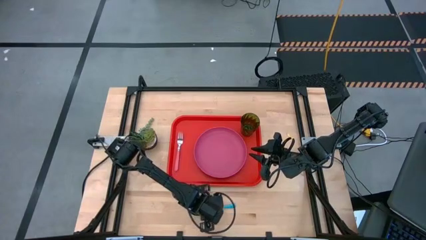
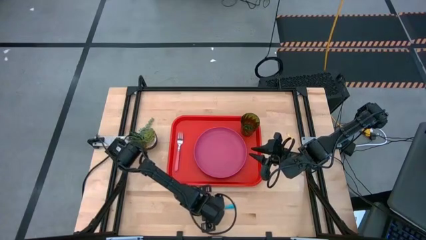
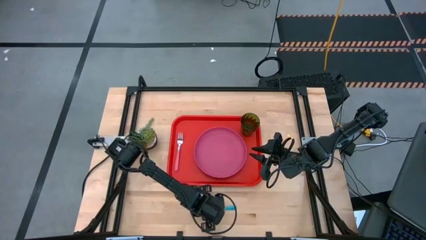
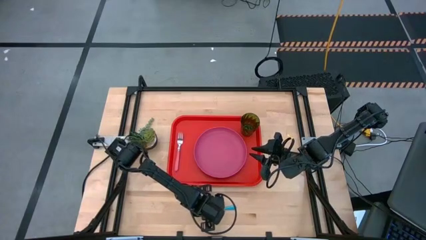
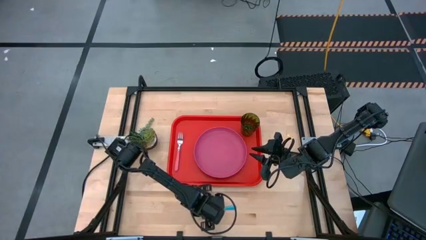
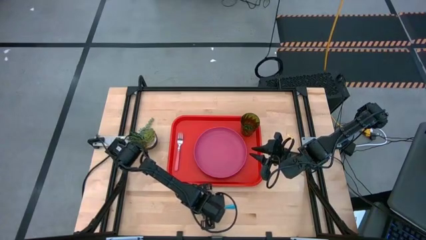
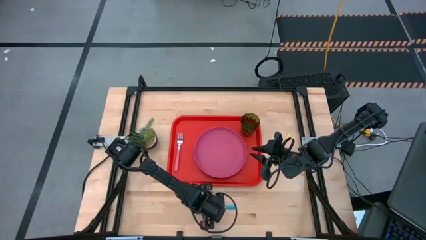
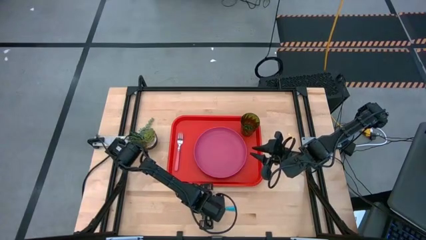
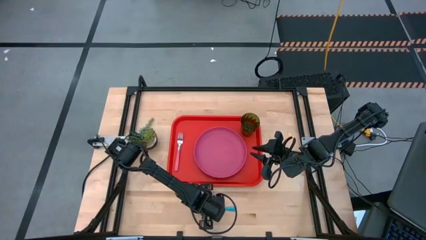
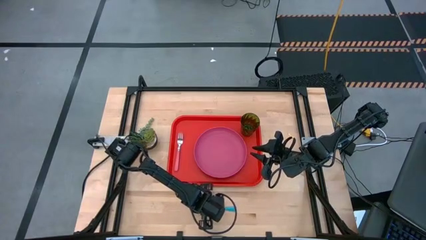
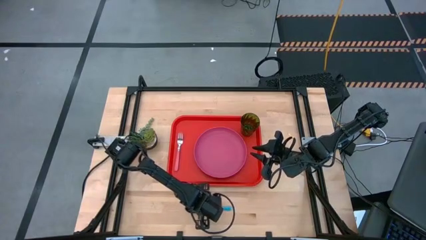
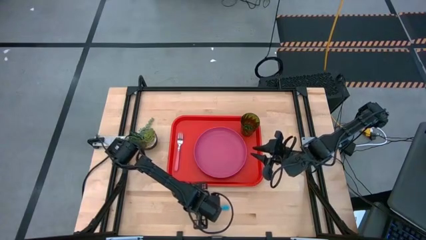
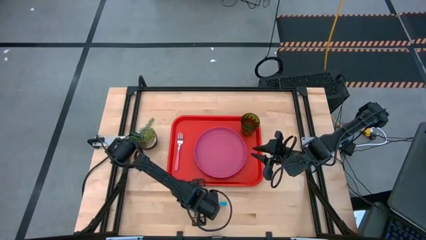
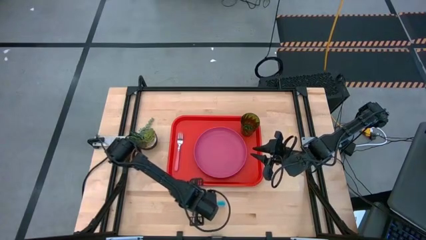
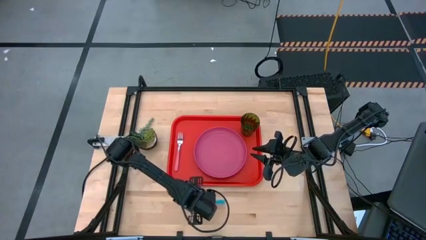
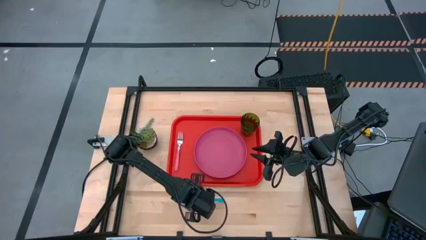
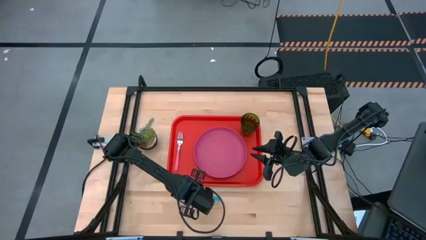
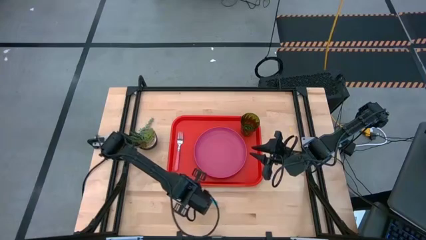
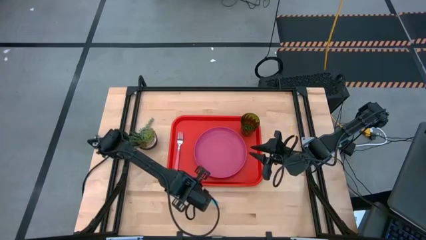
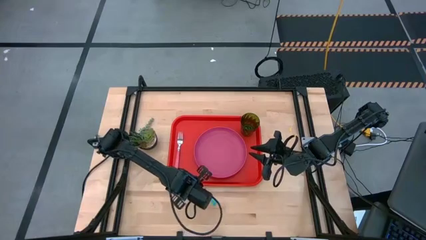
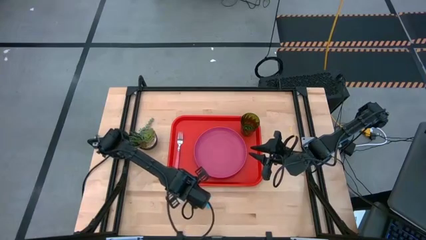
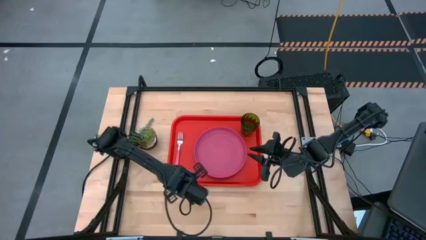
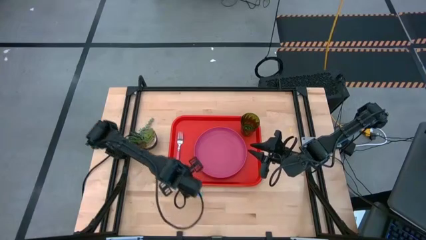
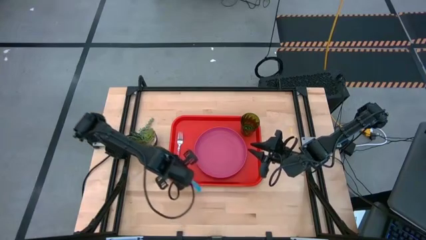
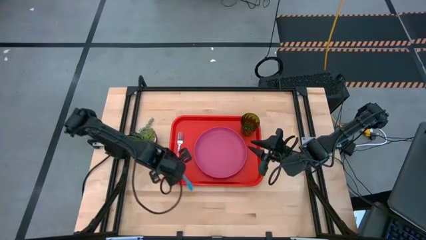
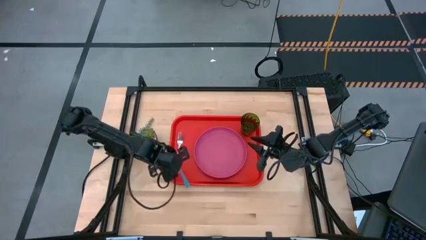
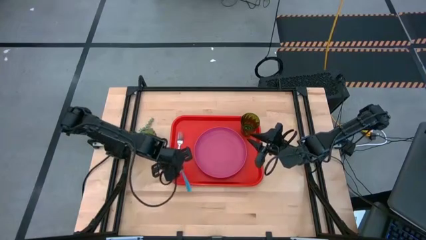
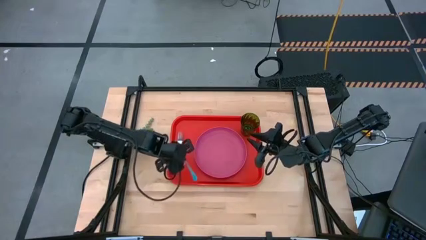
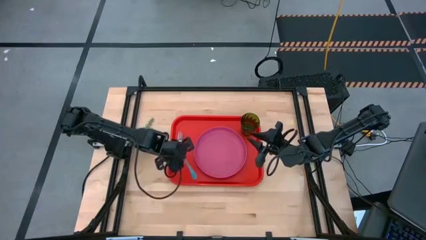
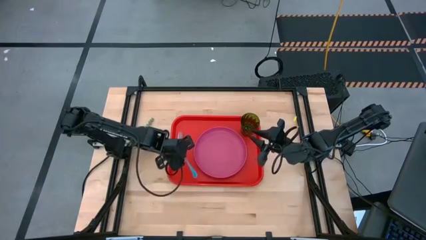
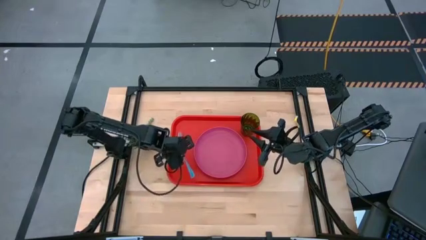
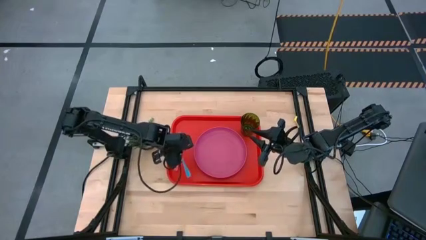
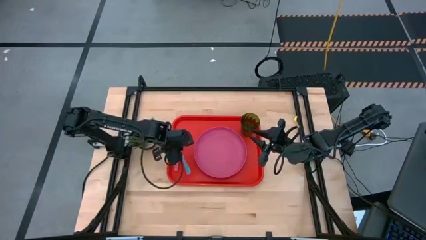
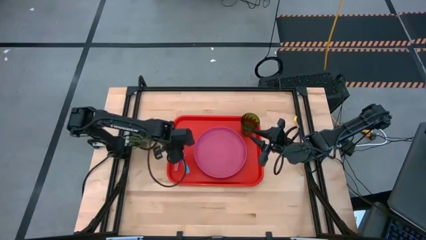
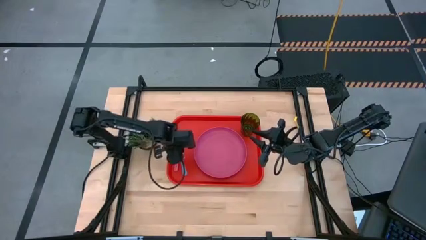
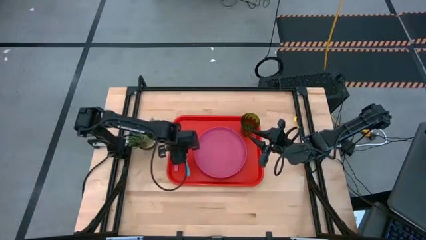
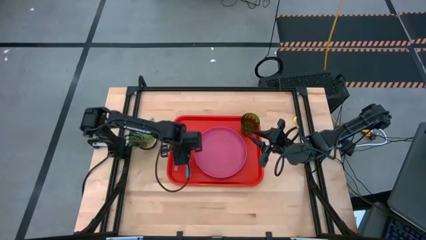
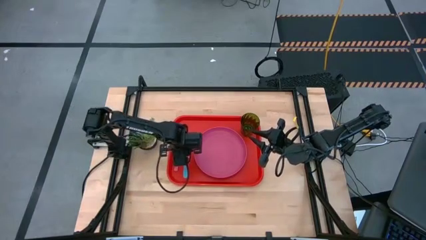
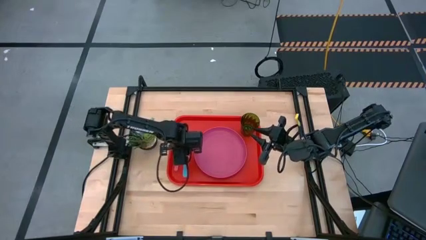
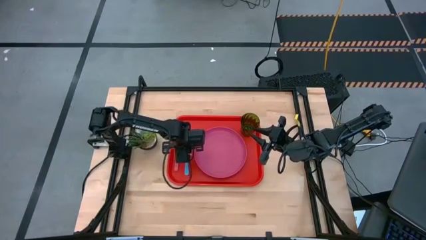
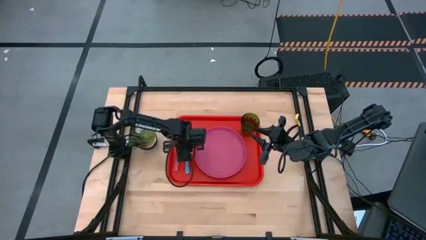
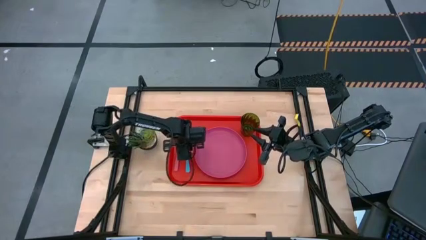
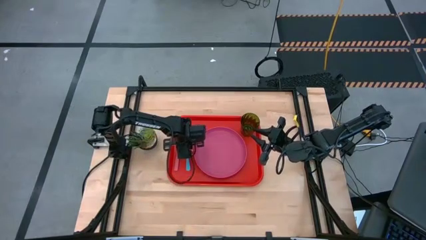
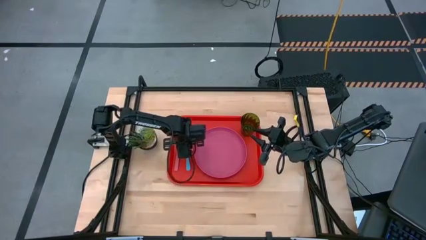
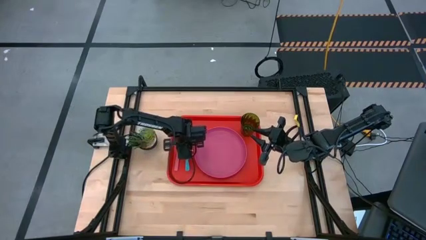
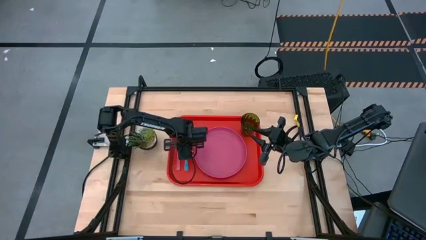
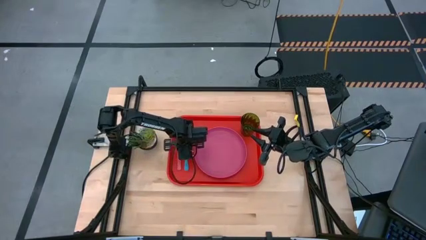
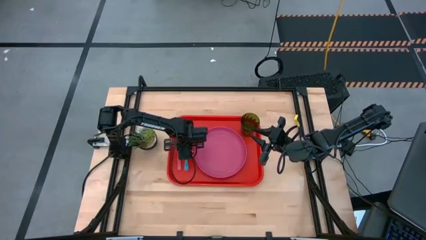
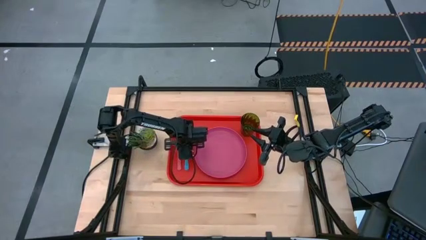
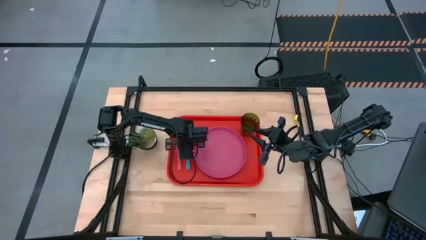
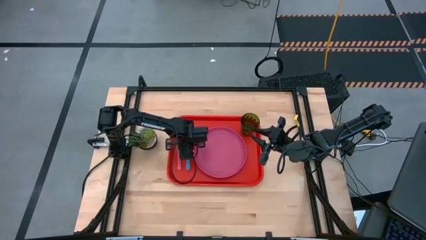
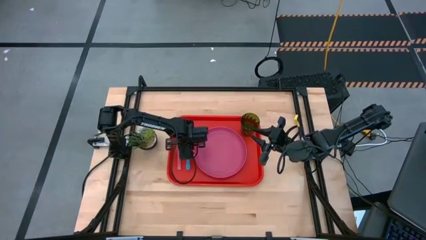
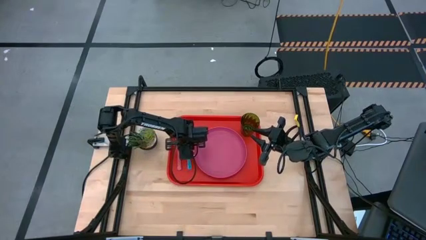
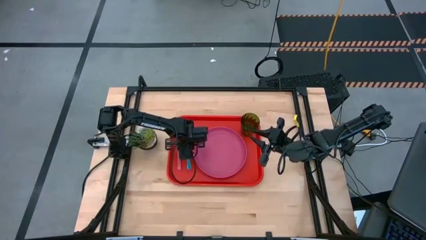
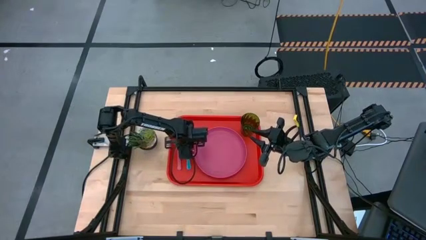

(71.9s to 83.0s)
Task: Pick and place plate/cup/fork/spoon on tray
Put the blue spoon on the red tray to the right of the pink fork

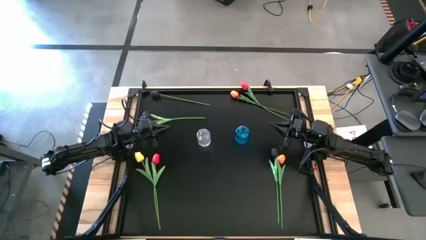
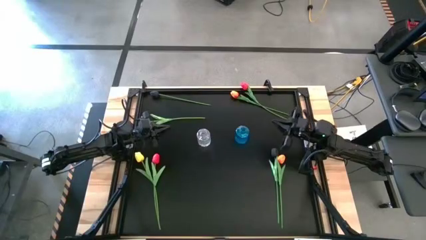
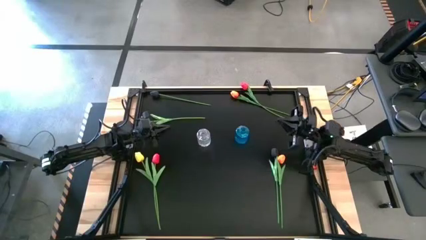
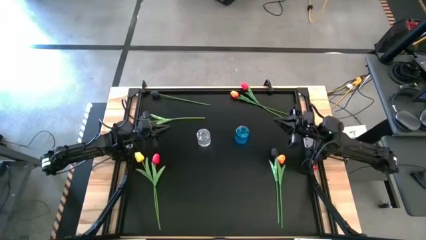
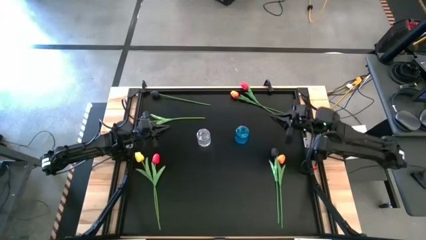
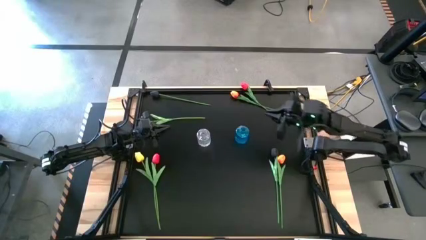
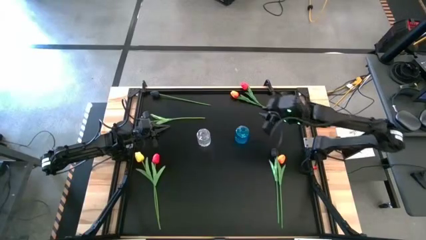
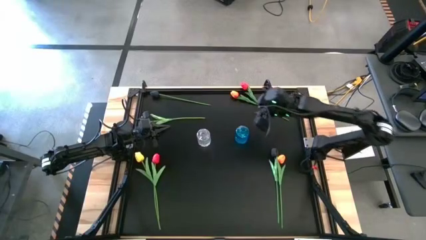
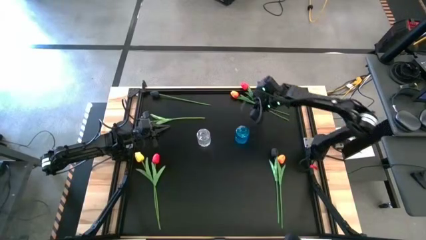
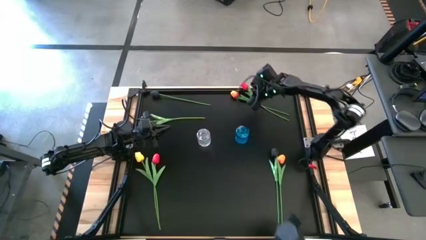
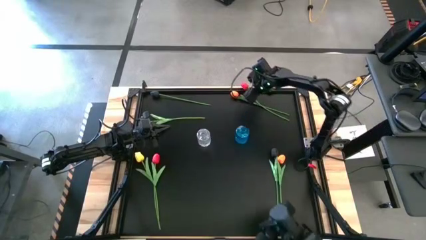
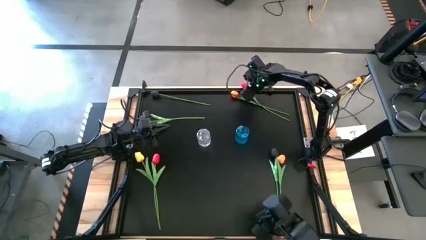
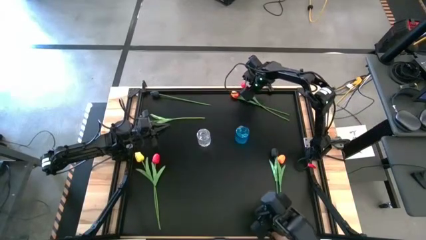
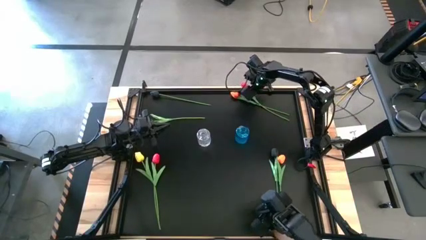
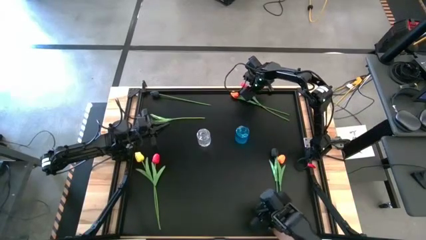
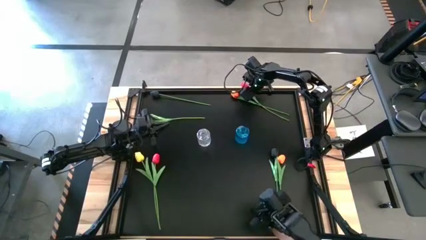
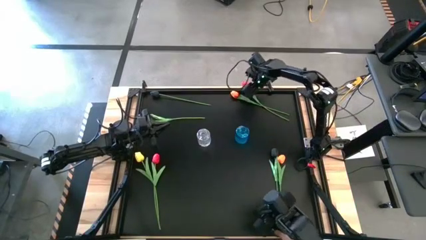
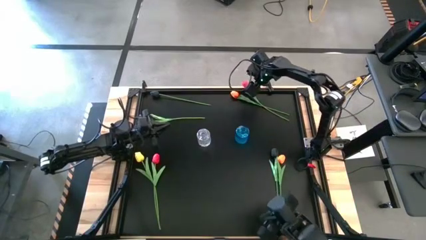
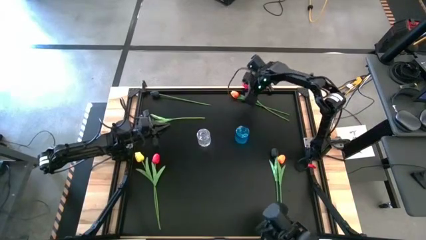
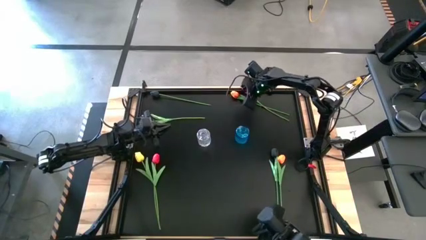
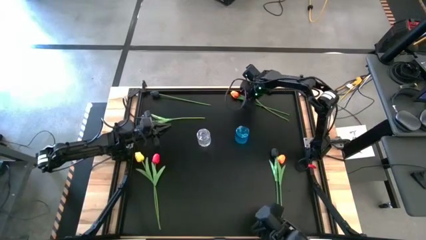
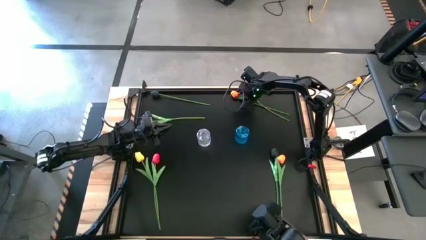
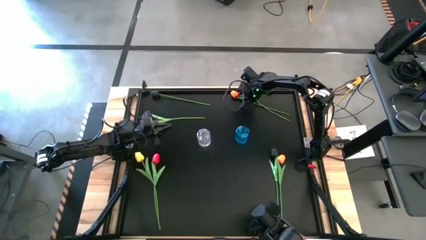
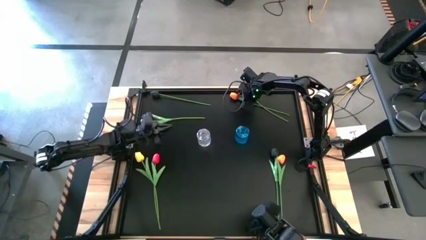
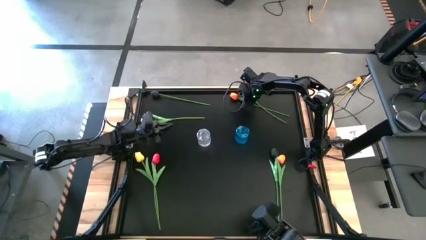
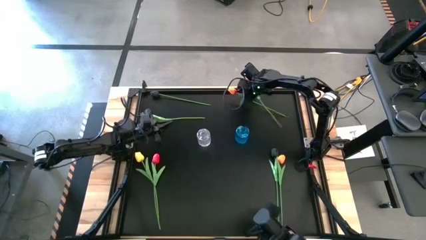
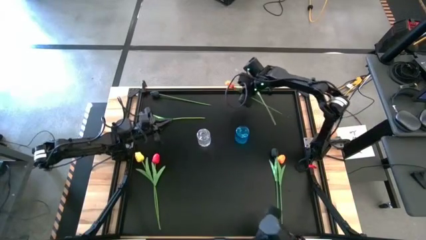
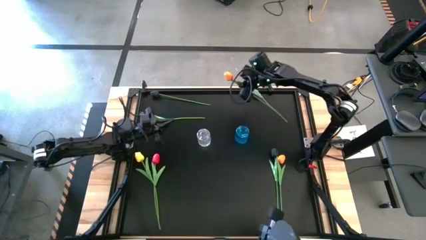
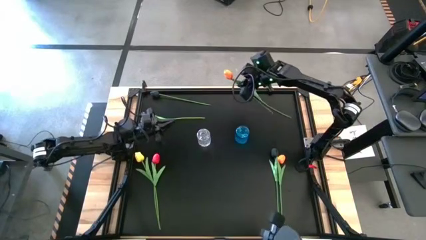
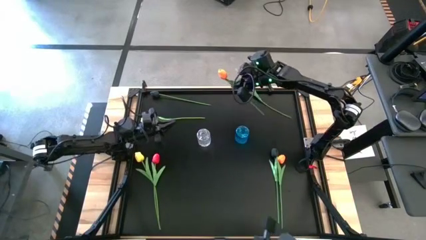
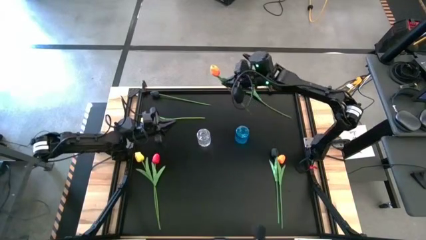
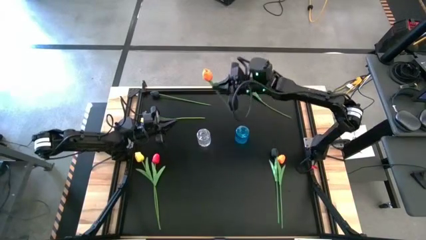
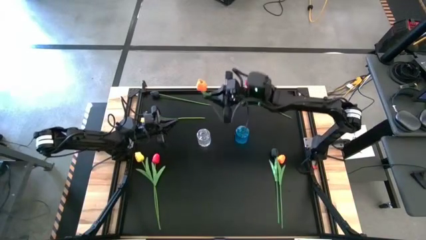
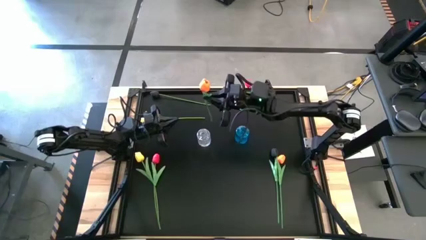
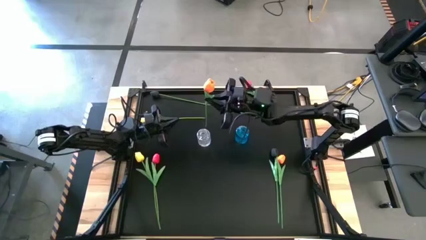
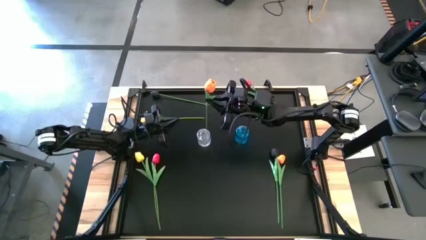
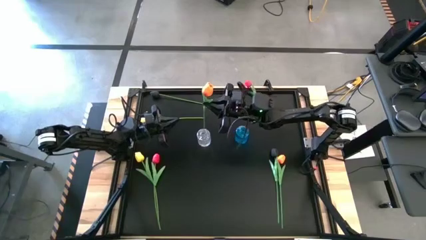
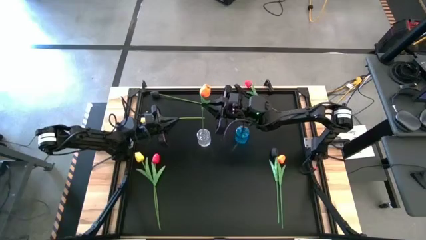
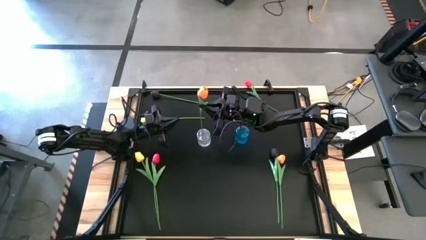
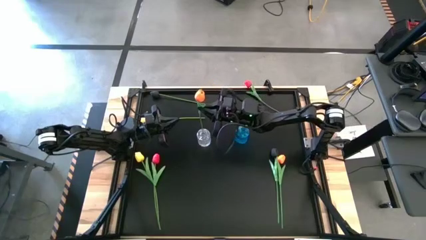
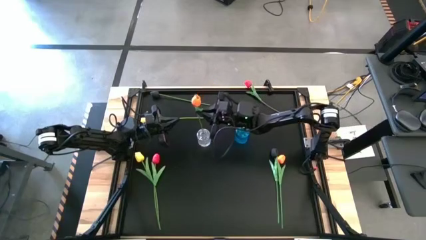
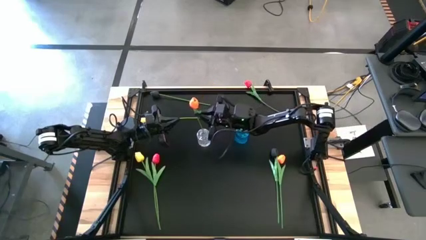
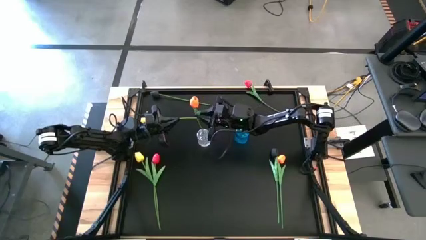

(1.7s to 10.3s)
Task: Sort flowers into vase by color
Put the top orange flower into the transparent vase
